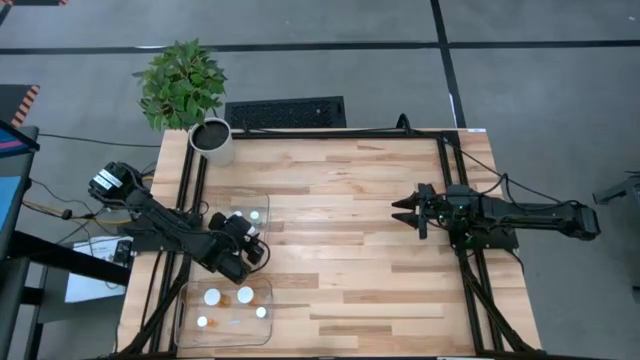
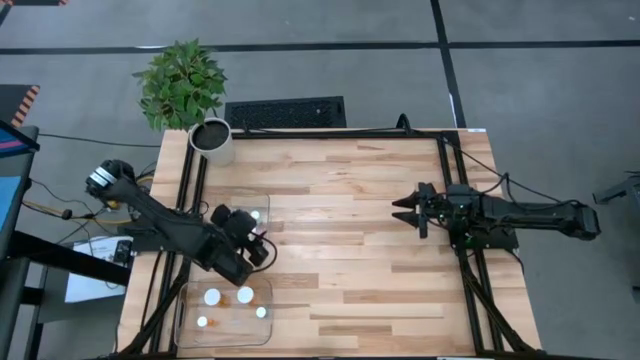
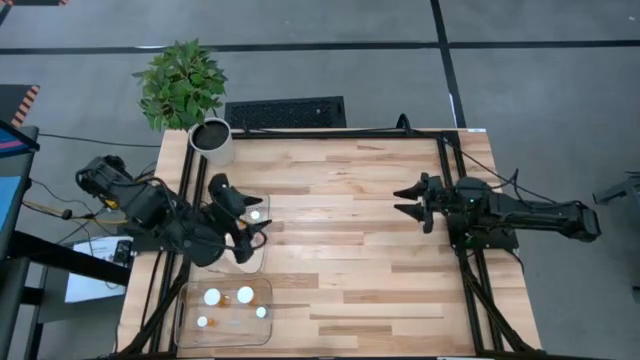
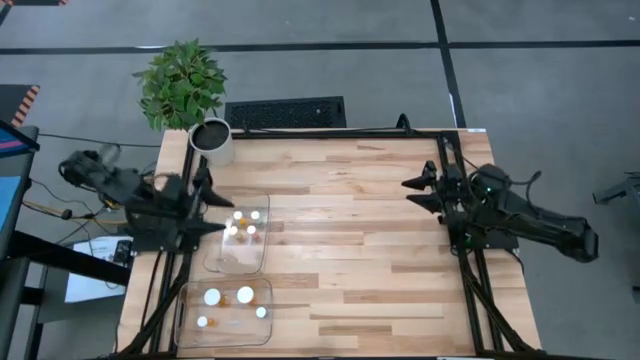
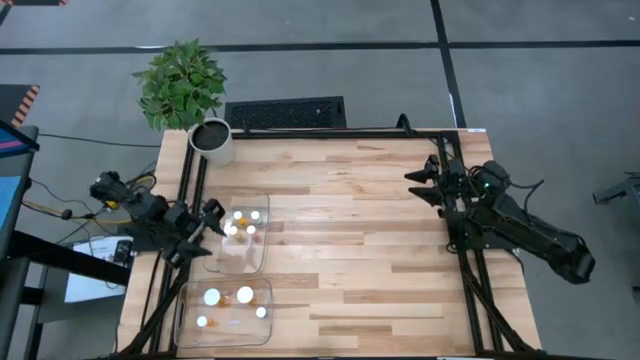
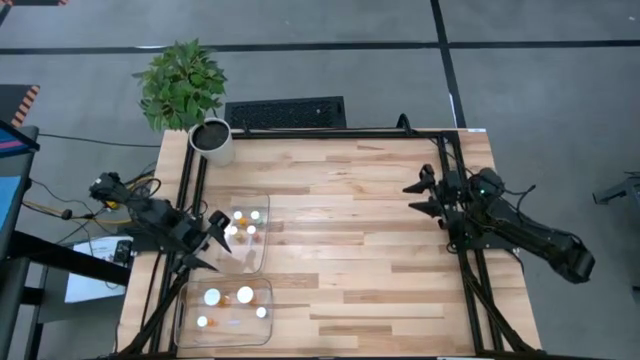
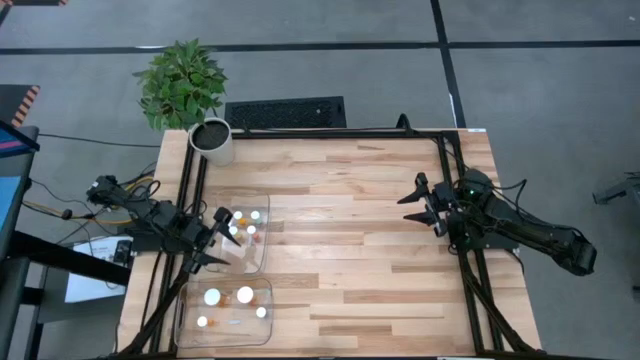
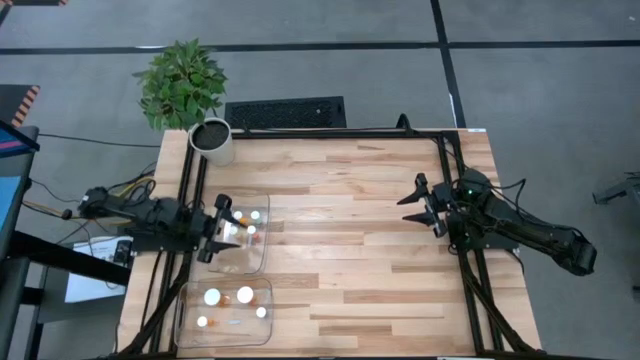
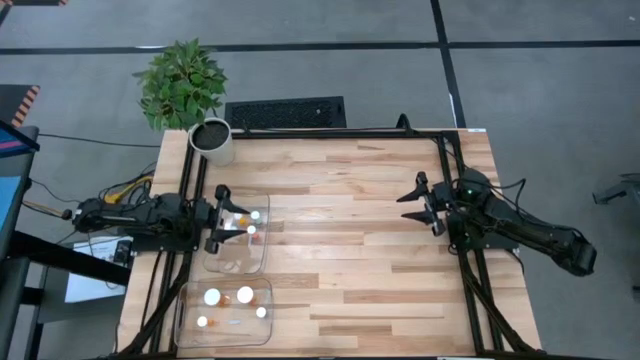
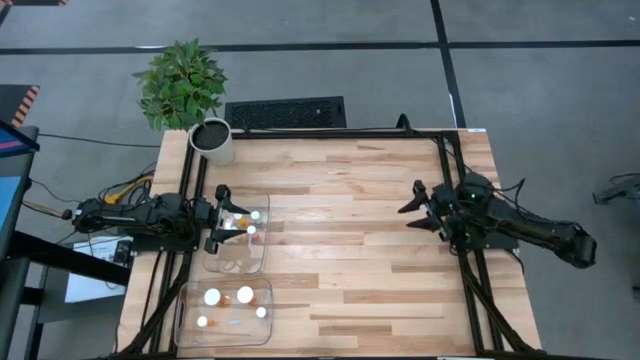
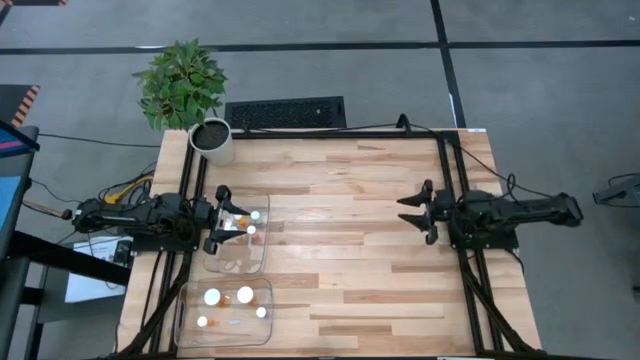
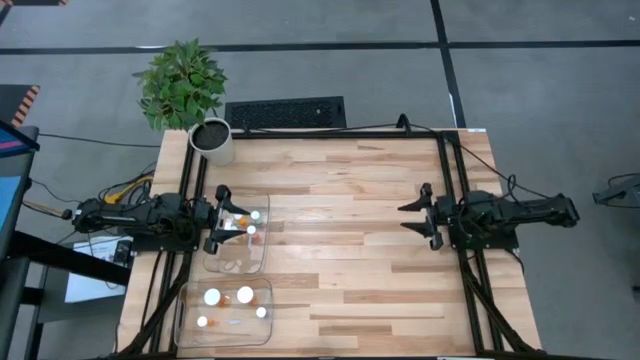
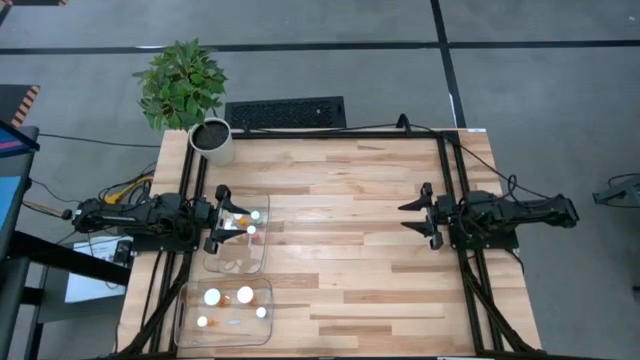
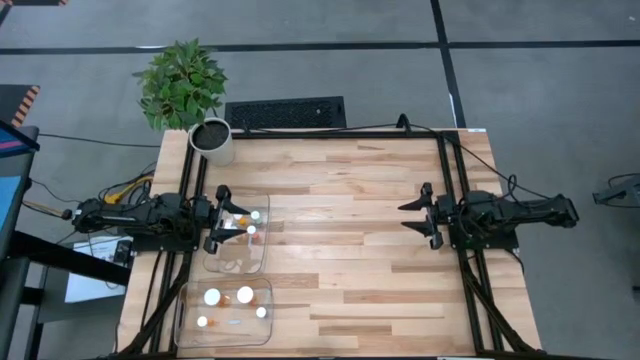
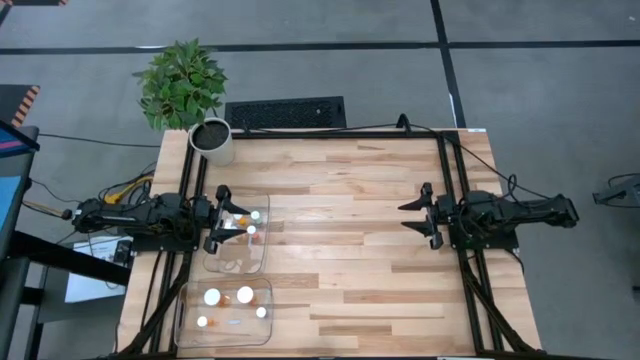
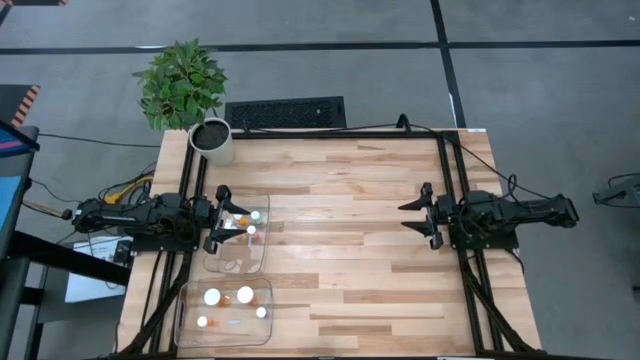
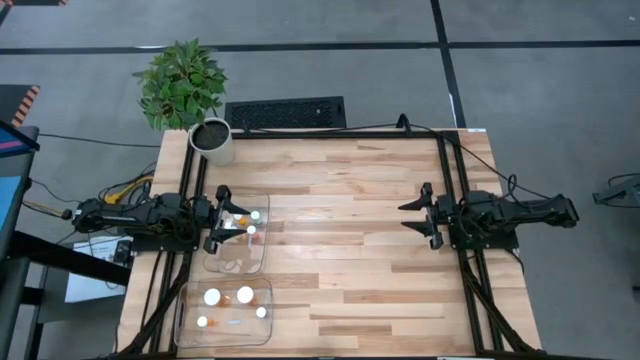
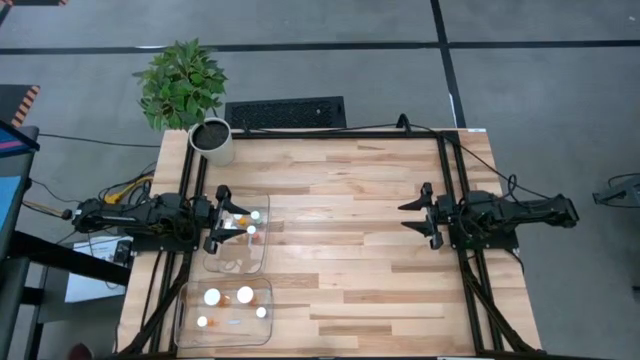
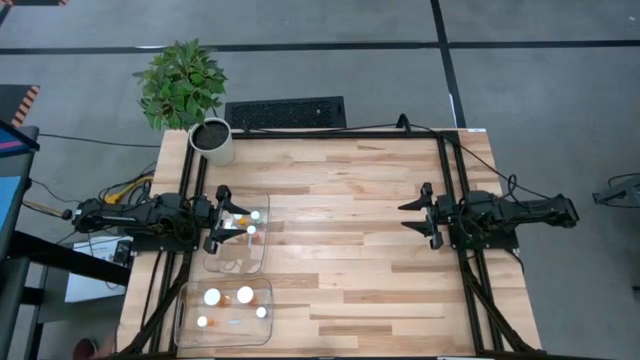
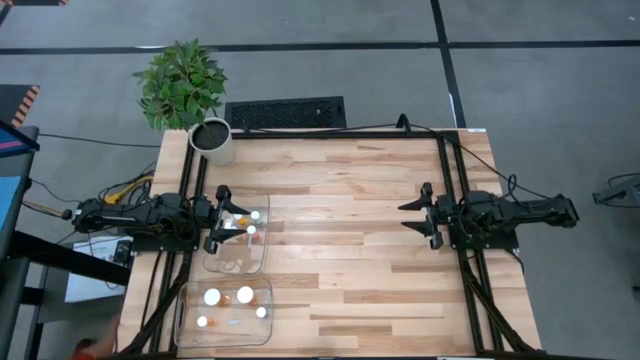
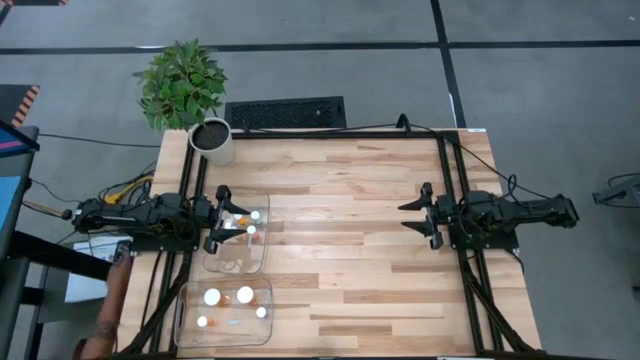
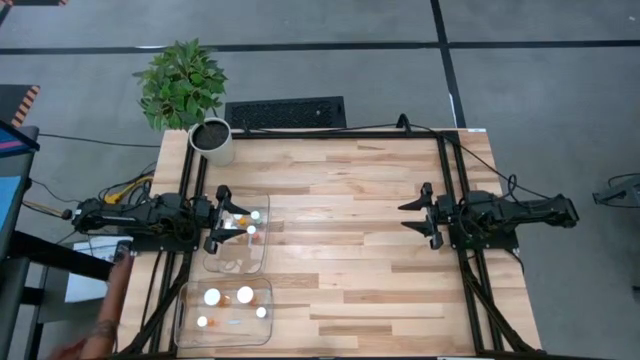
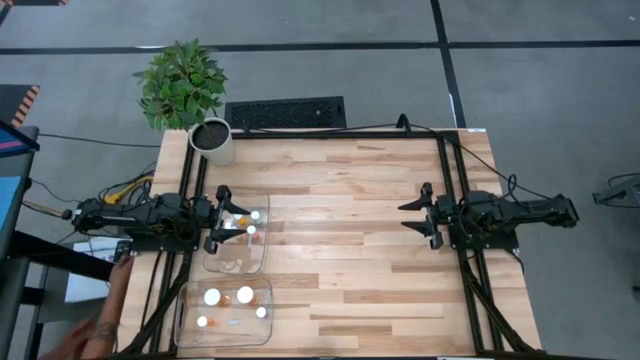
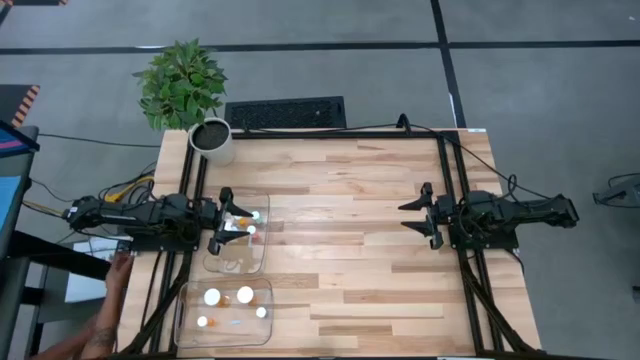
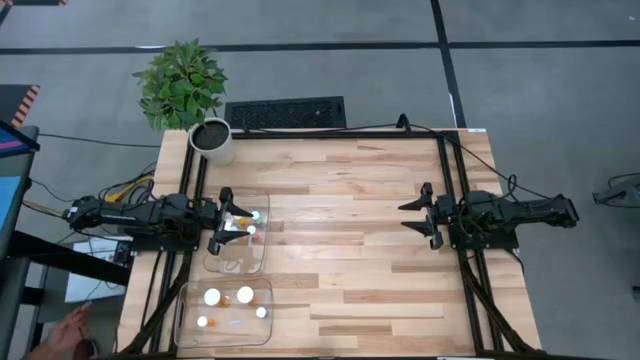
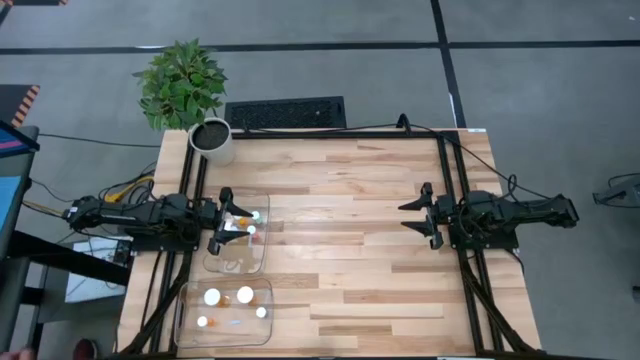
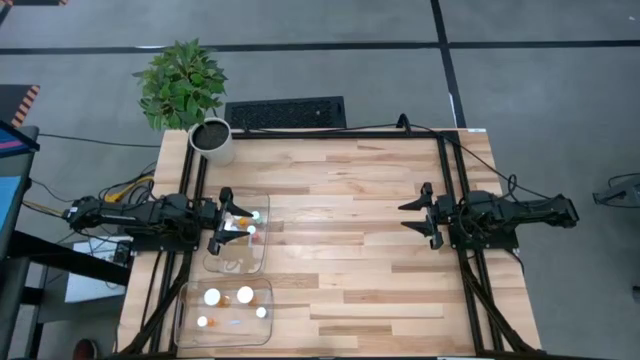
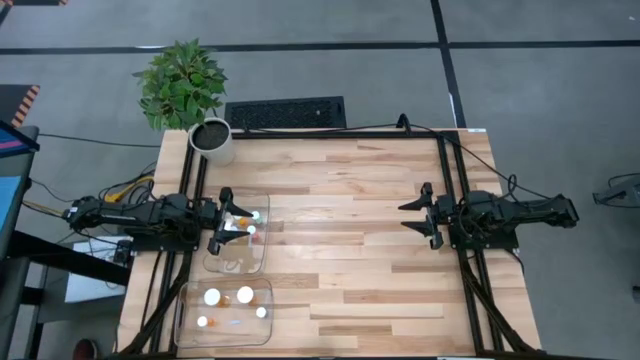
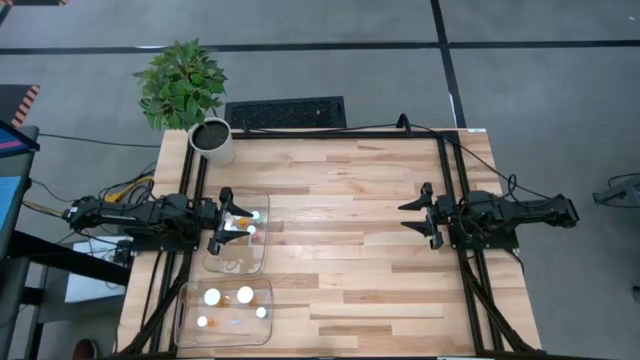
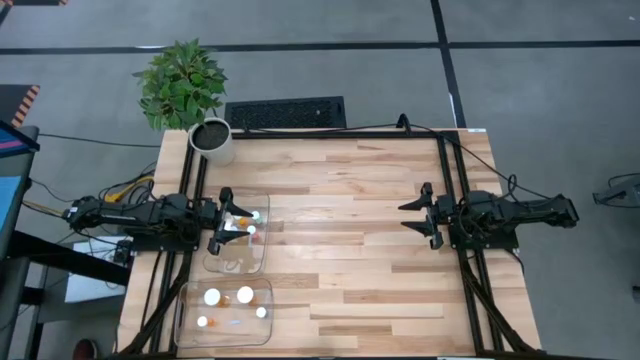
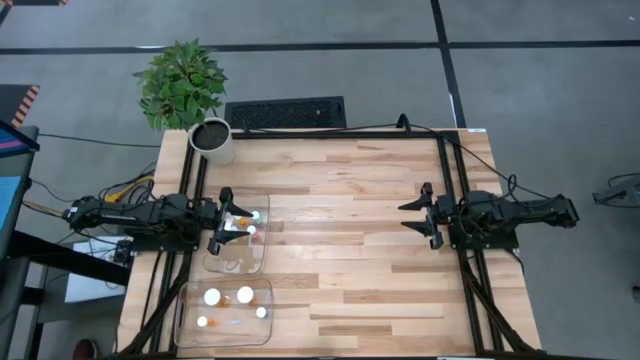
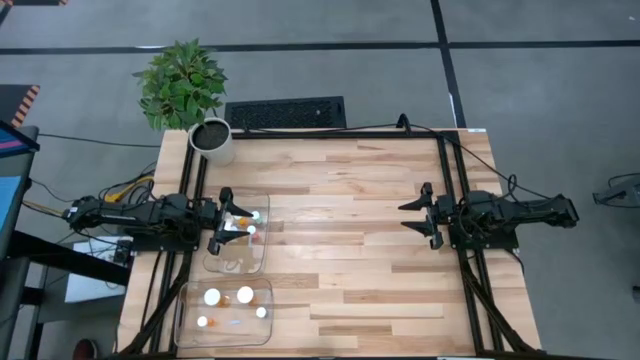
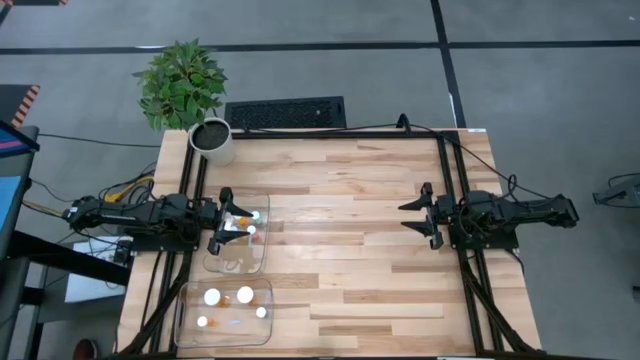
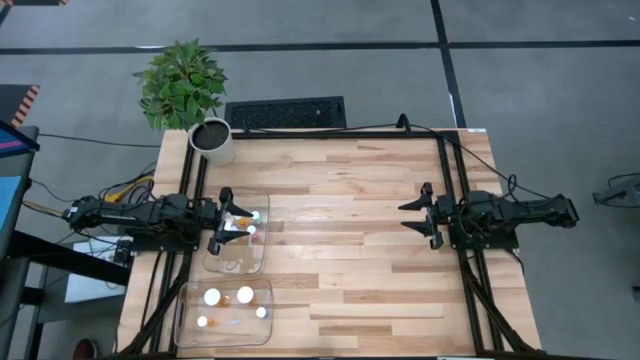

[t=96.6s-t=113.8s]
Task: Pick and place medicine bottles into bin by pill shape (circle, oval)
Return to Home Position

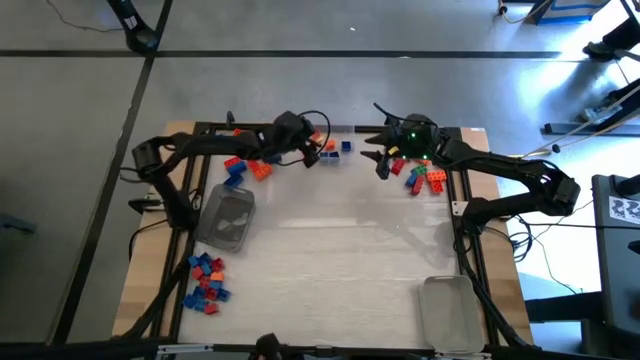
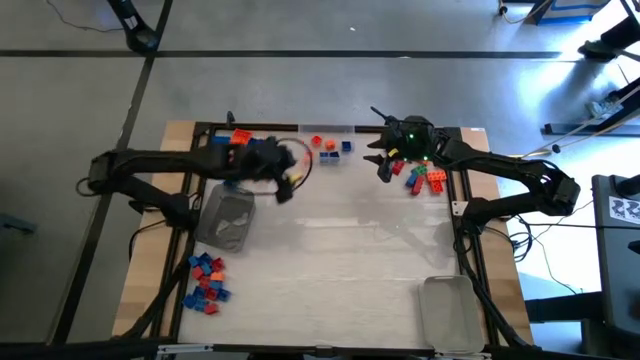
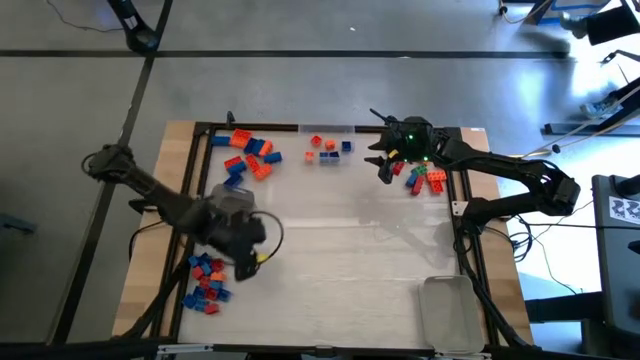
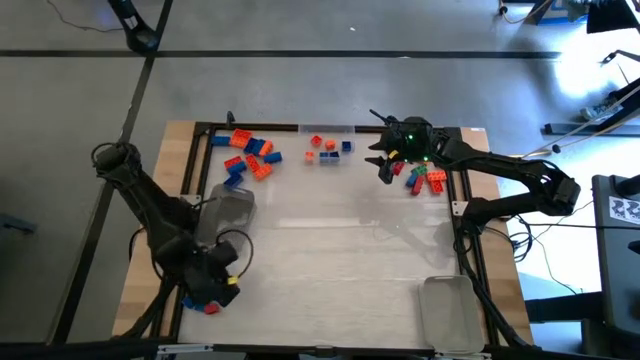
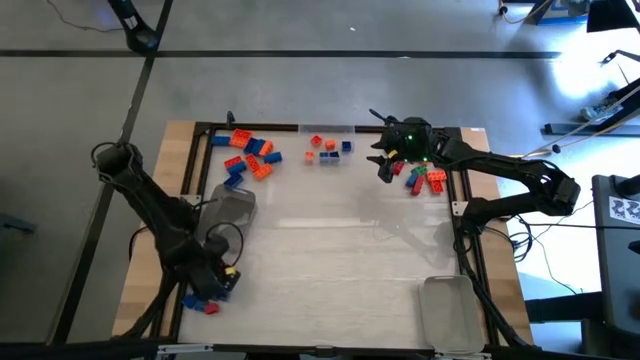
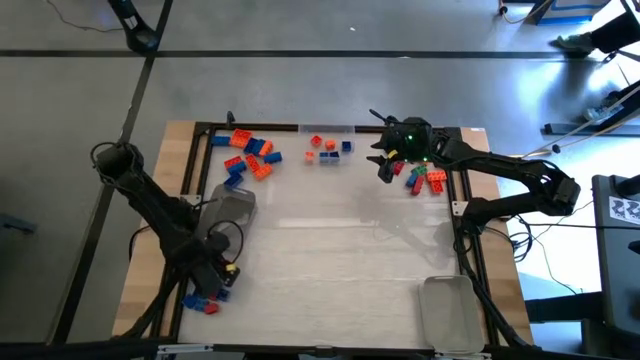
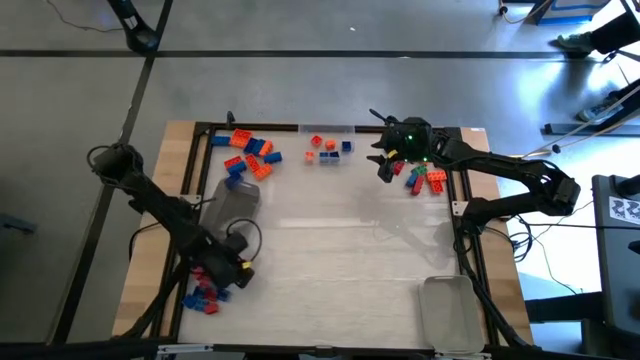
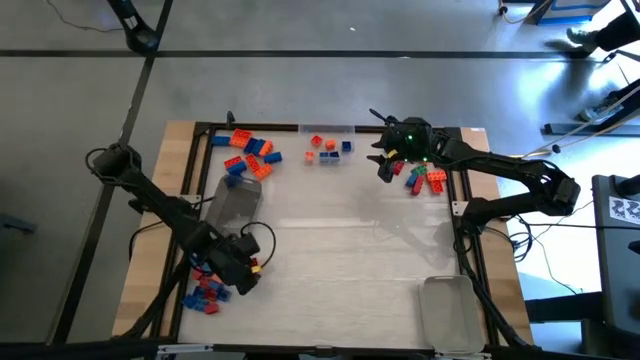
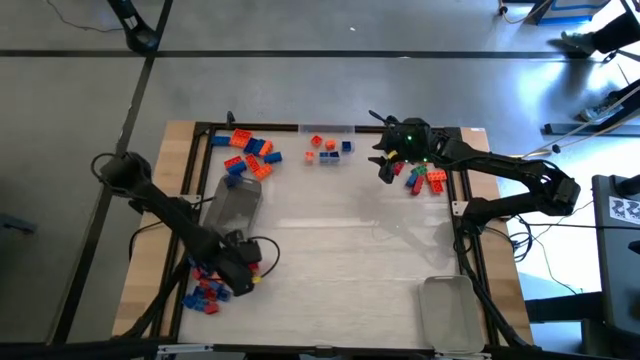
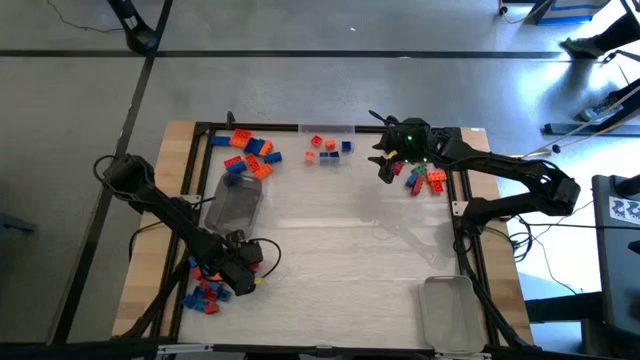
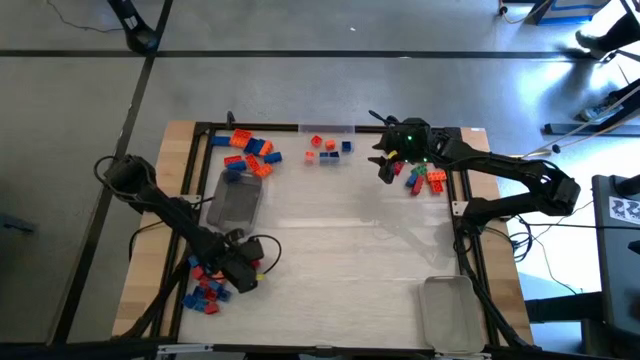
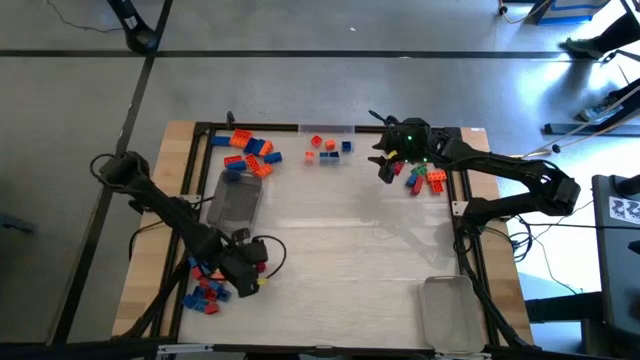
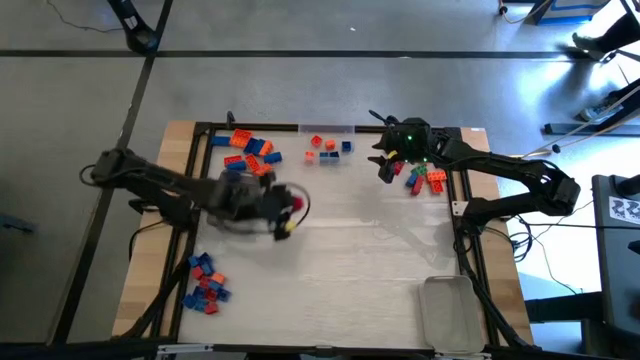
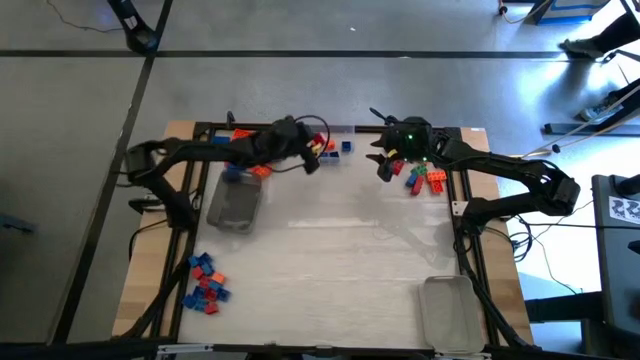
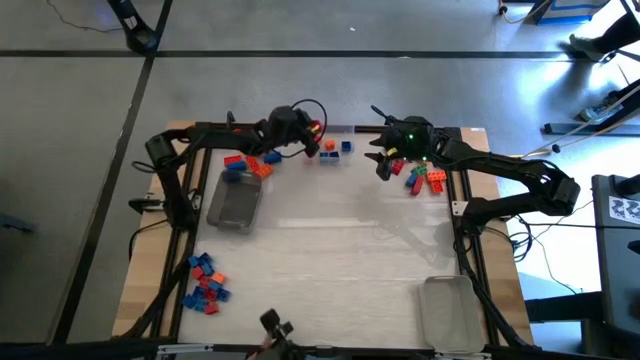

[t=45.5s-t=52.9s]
Task: Sort blocks by size
Put the red 4 stud game piece into the transparent bin
